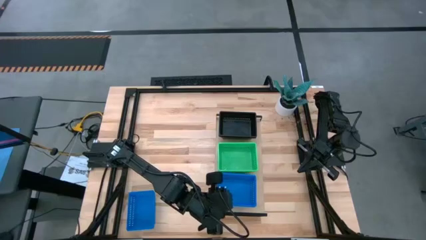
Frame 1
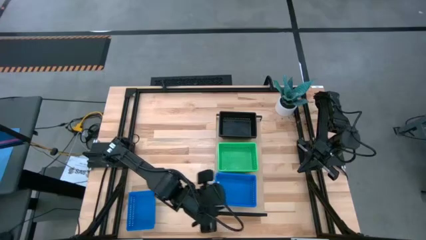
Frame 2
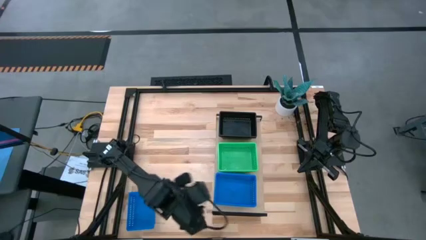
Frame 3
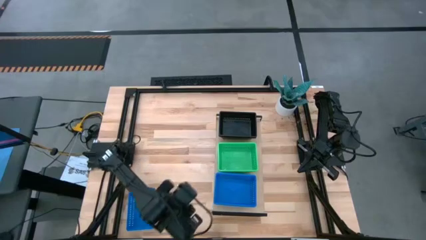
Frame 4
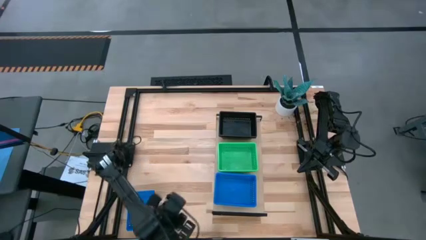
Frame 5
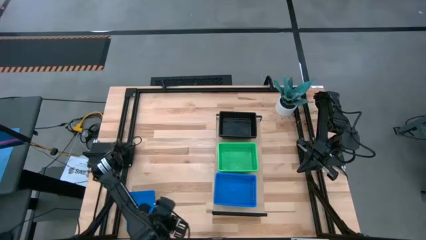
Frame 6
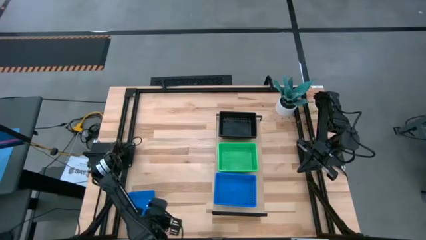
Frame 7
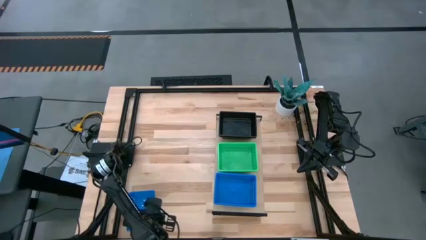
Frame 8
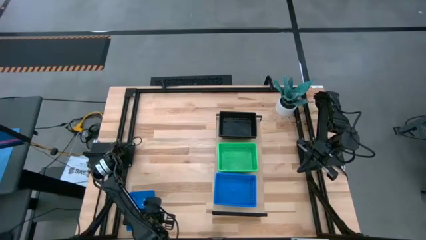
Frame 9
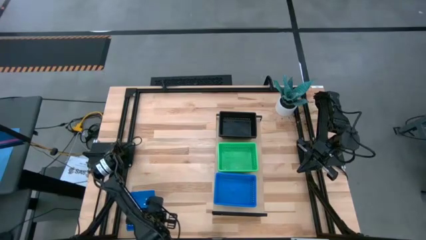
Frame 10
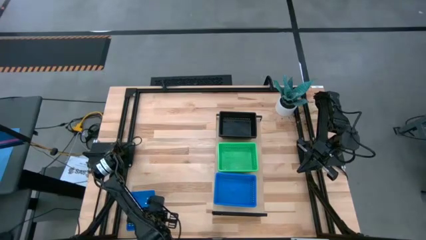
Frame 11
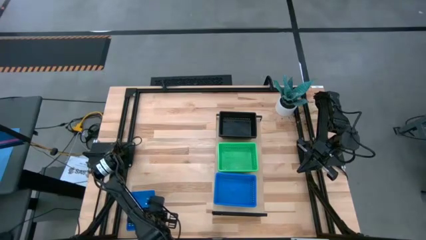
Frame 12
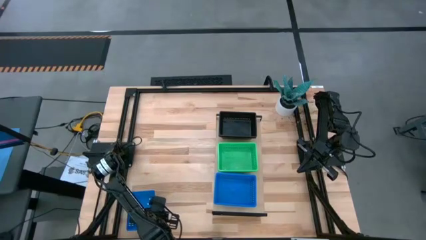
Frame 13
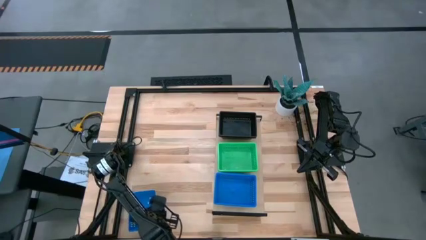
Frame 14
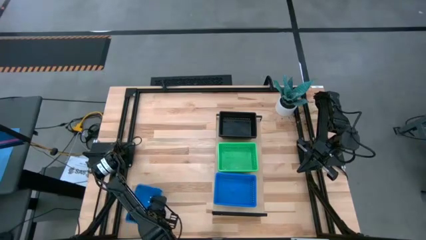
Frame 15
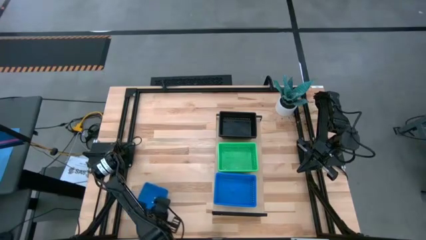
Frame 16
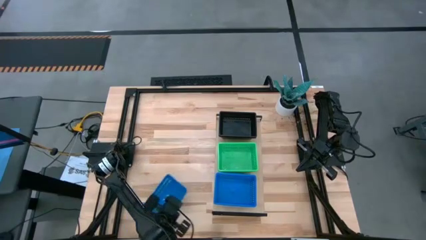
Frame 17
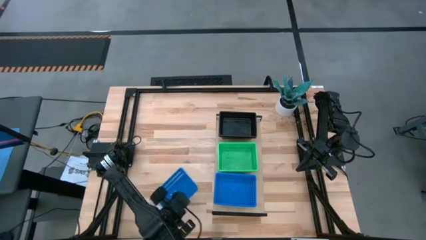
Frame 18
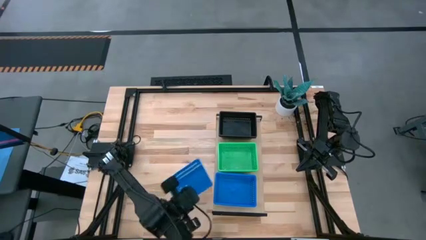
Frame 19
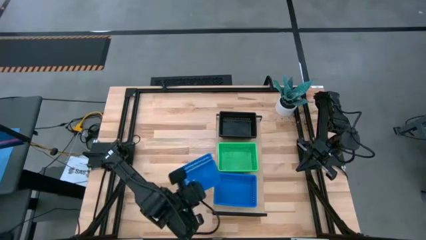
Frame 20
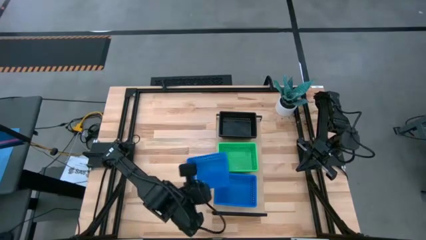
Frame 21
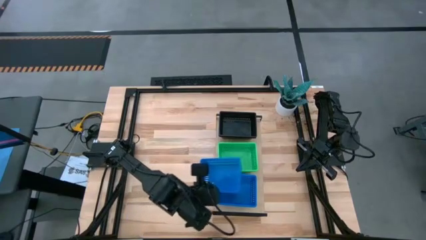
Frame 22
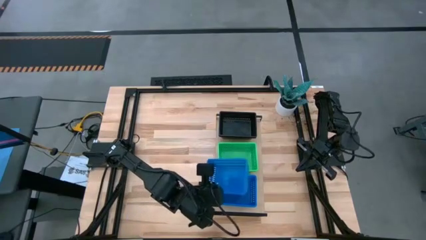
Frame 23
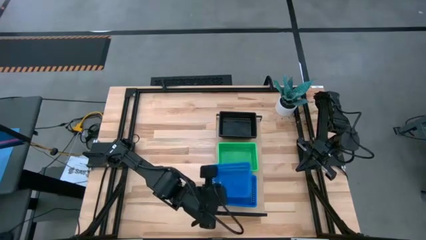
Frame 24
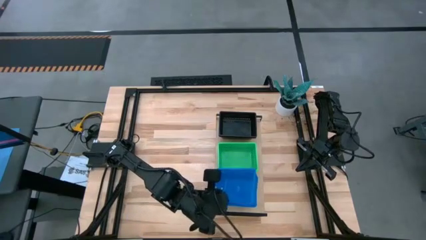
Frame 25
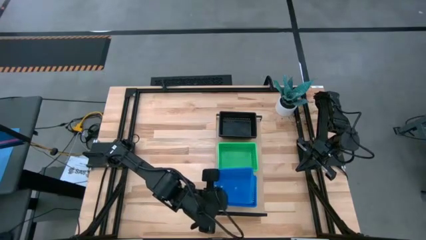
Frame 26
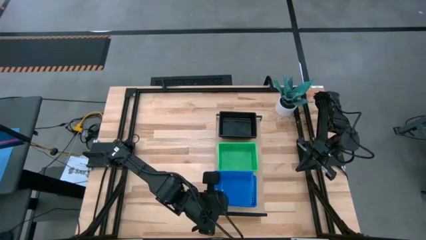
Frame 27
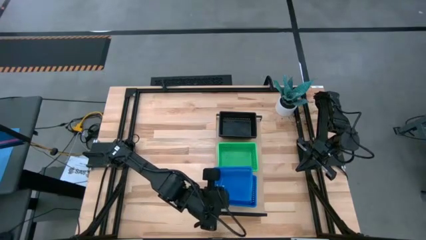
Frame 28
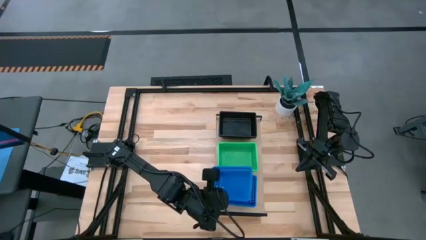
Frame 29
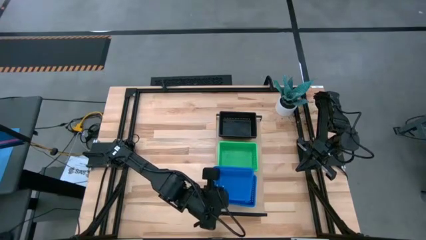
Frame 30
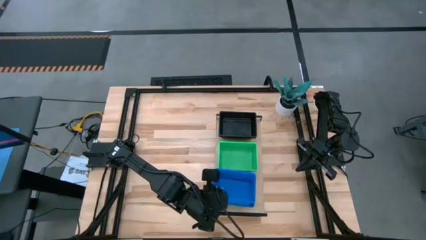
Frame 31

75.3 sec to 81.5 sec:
Task: Stack baskets on shelf by color
Stack the blue bin into the blue bin on the shelf

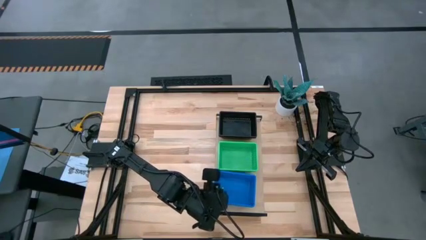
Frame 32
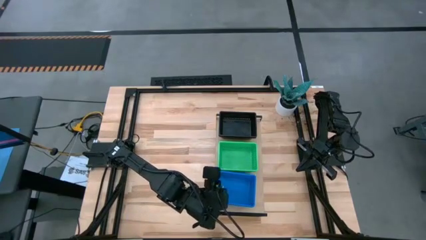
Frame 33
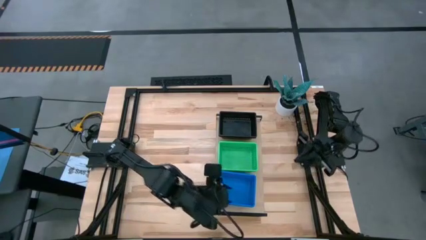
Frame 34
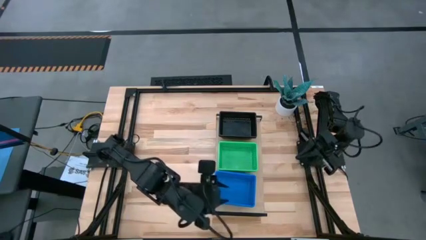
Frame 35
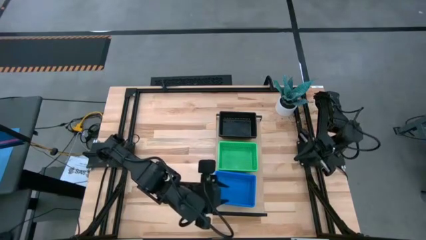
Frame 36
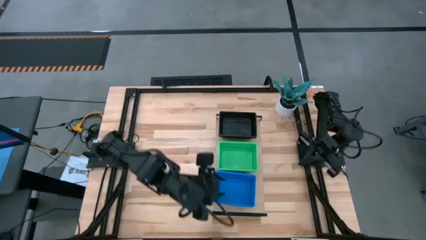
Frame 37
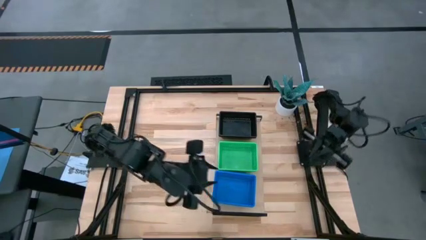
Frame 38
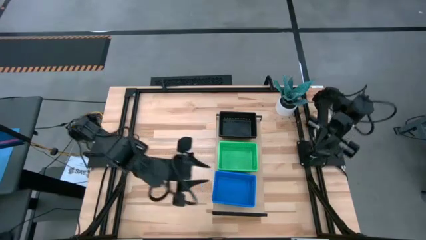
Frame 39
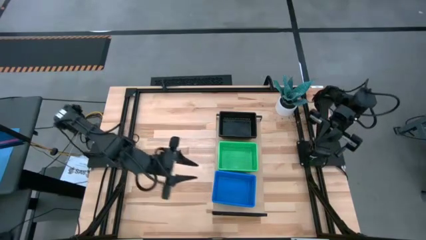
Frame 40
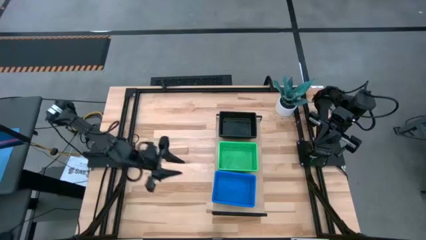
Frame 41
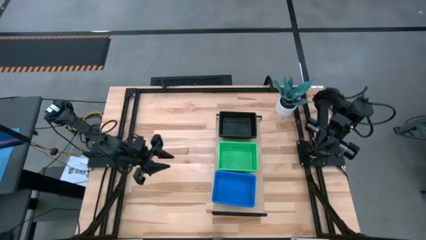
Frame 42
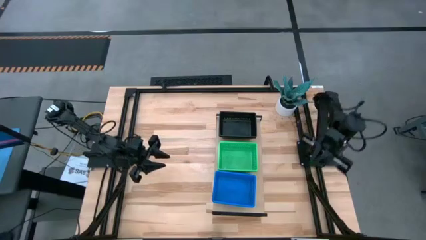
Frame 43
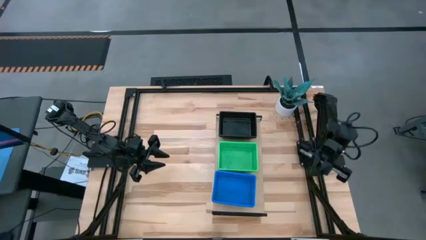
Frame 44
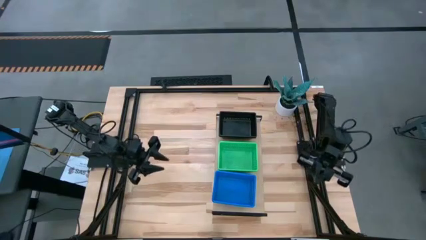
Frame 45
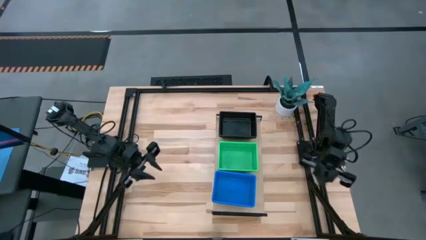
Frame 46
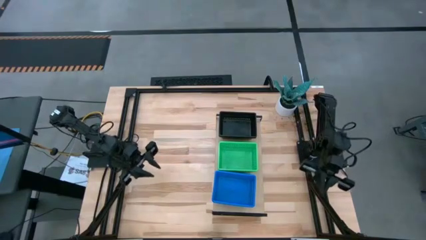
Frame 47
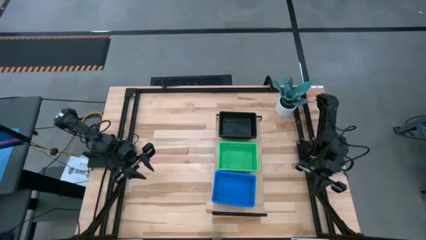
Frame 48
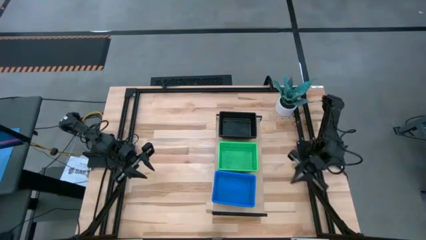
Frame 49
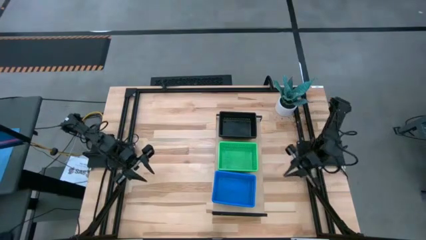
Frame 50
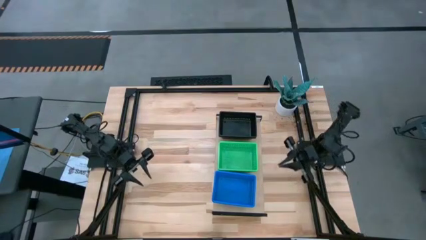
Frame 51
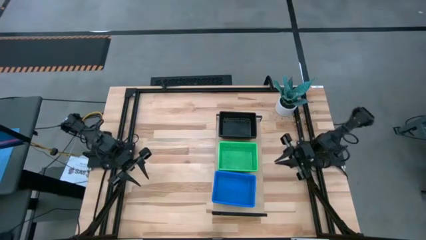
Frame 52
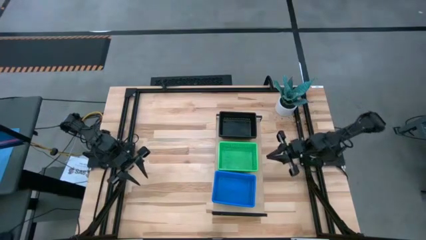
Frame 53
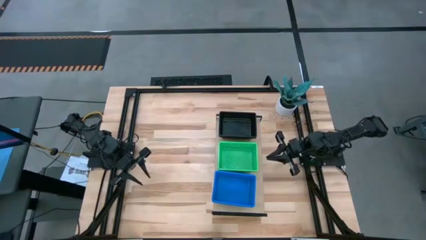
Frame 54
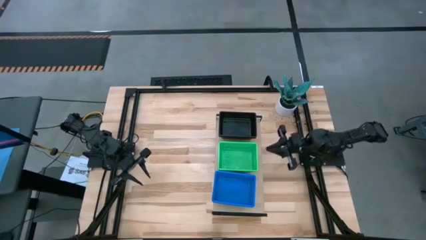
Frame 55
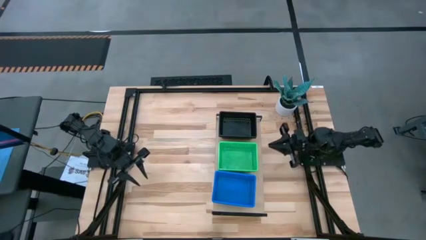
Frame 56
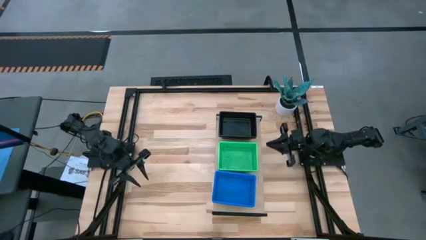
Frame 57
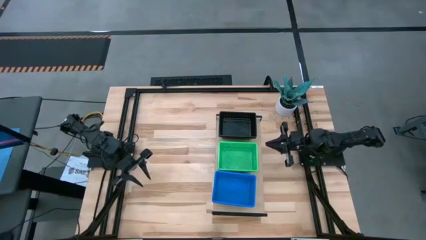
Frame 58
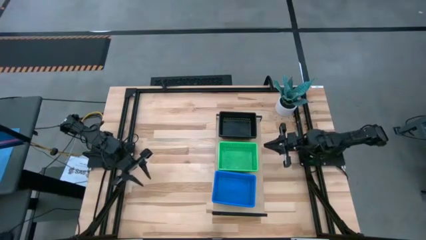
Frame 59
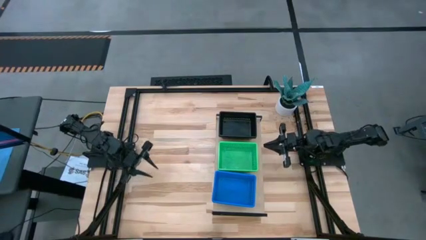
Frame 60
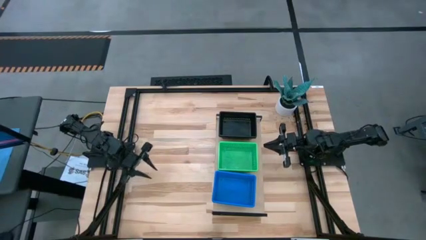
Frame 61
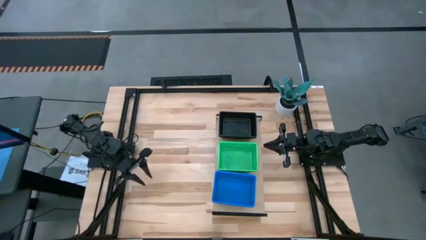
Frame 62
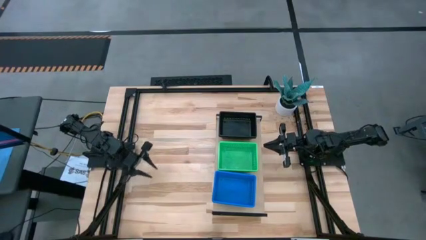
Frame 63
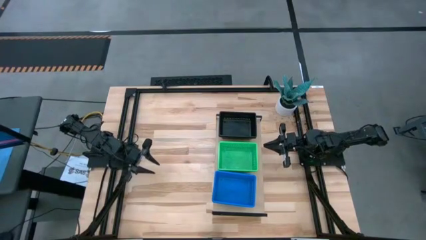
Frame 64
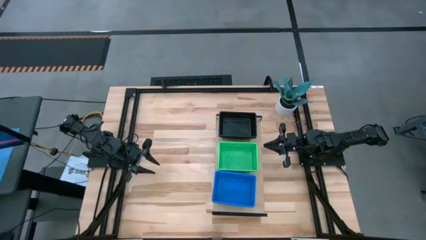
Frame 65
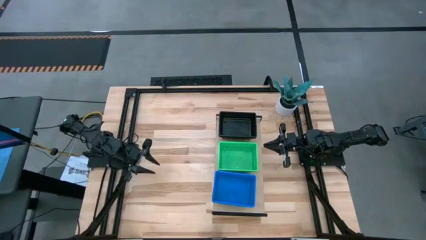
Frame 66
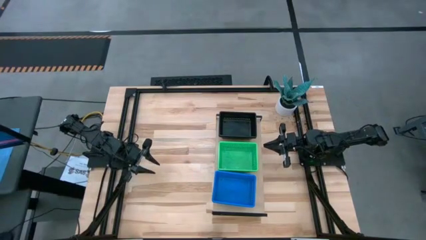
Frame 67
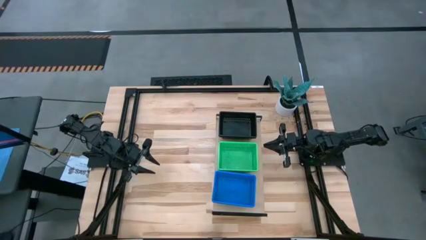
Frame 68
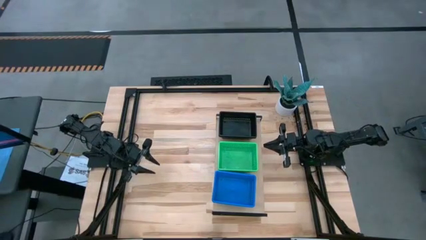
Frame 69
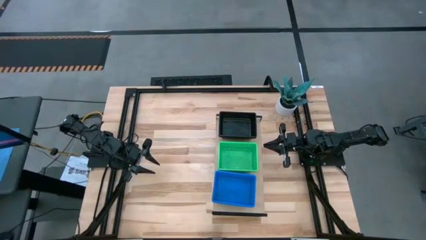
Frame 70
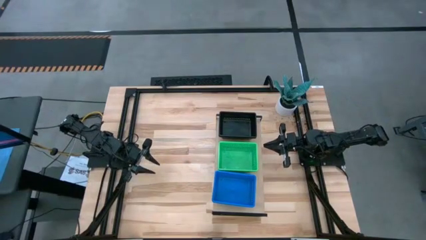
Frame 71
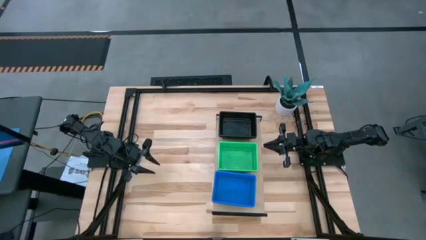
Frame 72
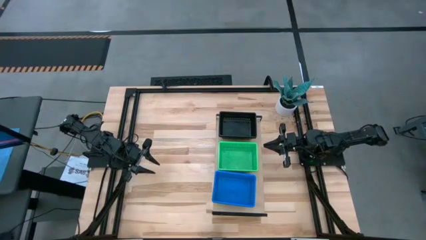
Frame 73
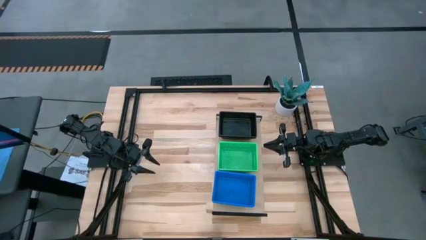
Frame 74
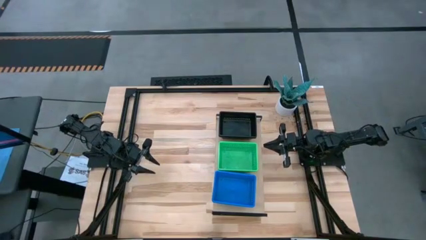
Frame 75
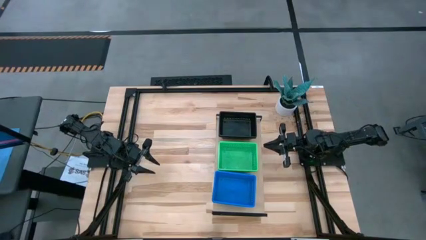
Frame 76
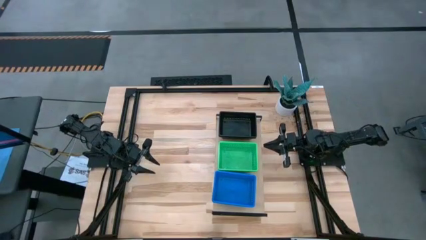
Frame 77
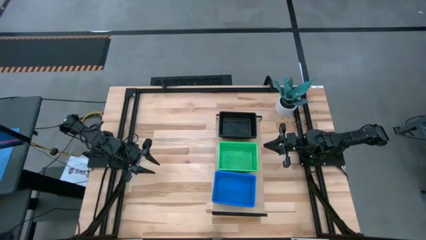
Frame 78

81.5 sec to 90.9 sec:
Return to Home Position
